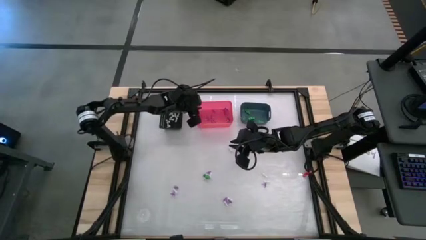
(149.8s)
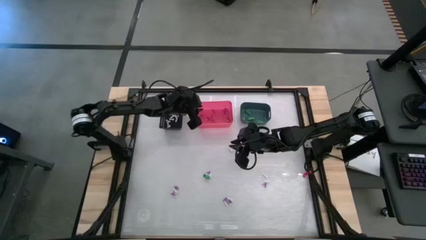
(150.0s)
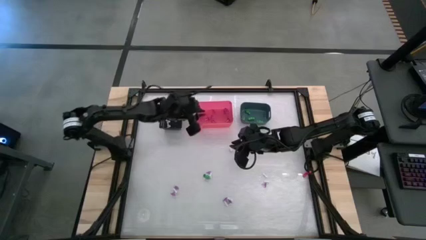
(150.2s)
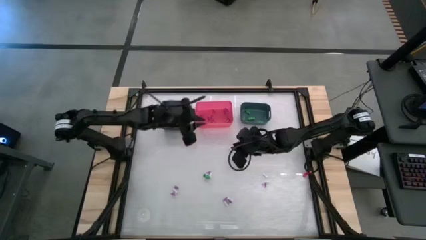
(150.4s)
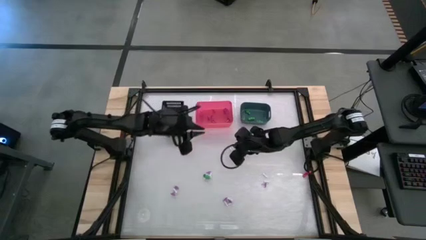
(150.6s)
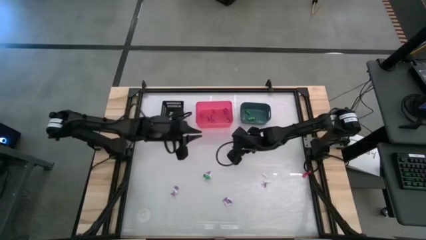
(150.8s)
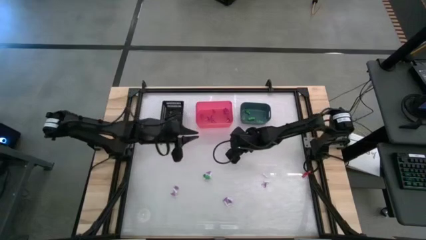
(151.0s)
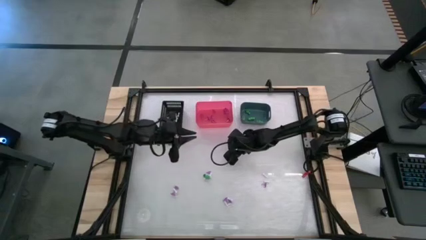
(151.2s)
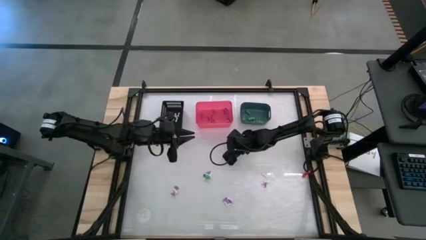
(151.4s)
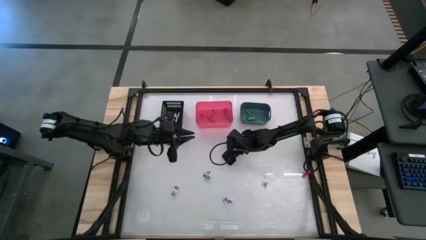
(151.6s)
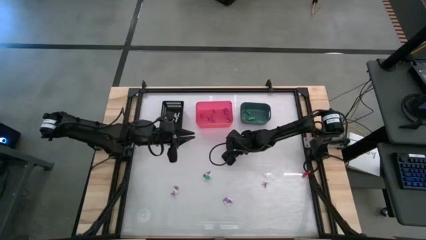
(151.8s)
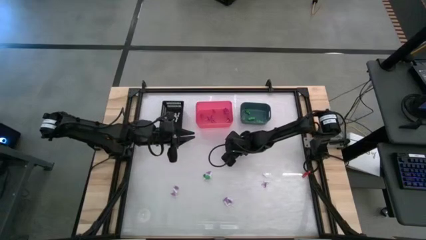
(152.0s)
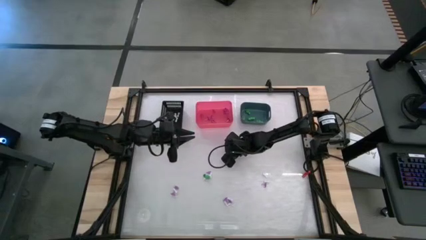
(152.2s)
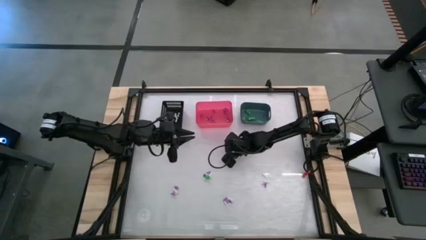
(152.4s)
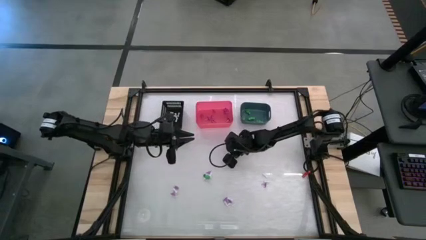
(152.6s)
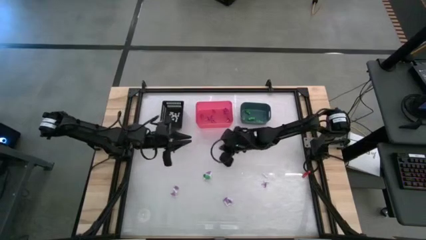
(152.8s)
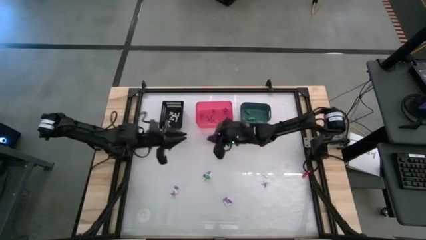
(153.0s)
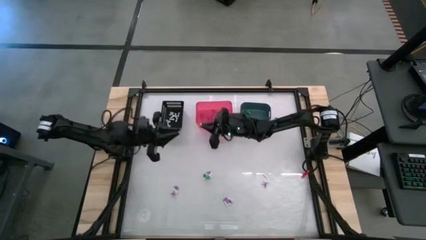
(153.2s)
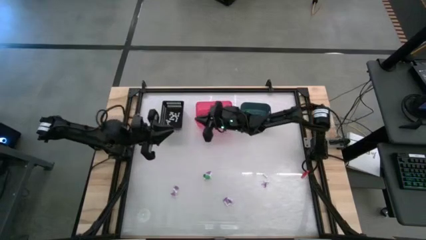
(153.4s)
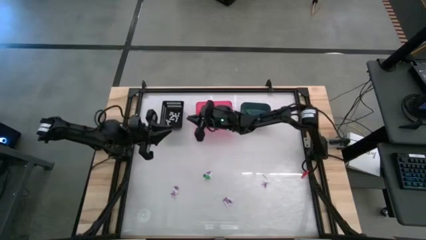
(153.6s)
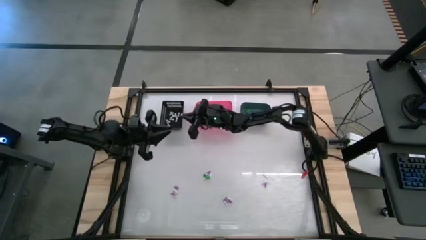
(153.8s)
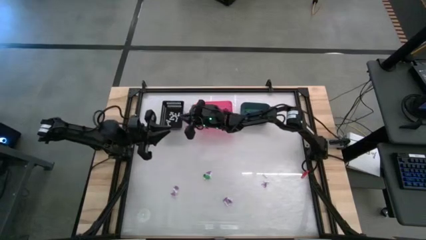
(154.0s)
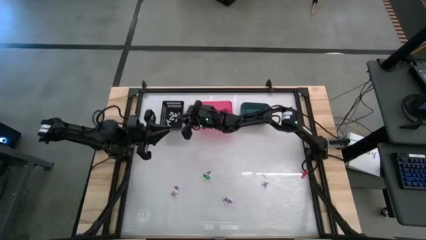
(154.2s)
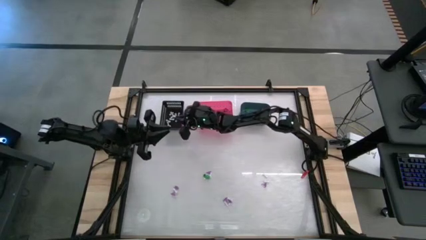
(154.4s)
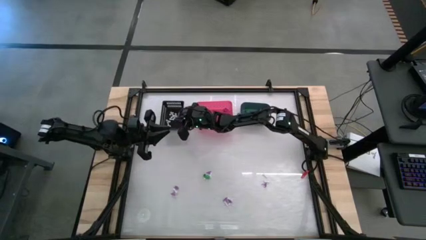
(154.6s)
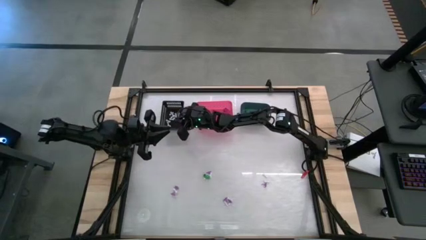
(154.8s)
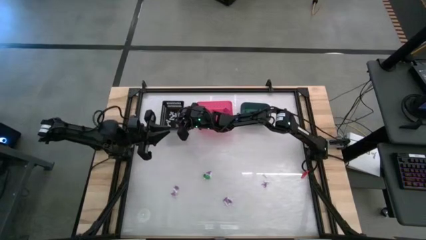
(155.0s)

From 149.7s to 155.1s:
Task: Sort Halloween decoration
Put the white bone toy into the black bin

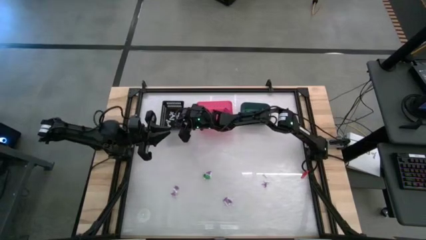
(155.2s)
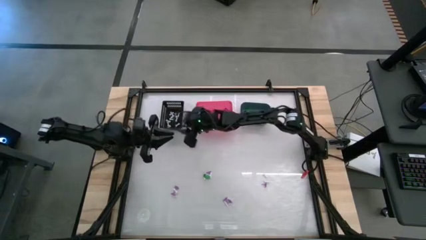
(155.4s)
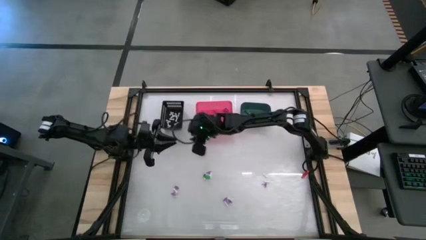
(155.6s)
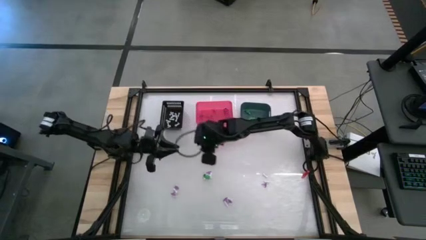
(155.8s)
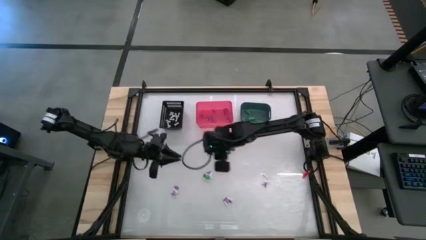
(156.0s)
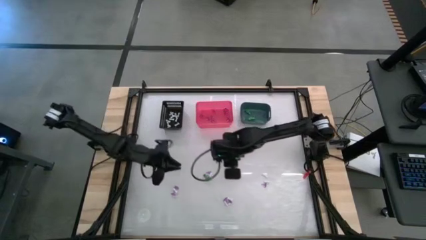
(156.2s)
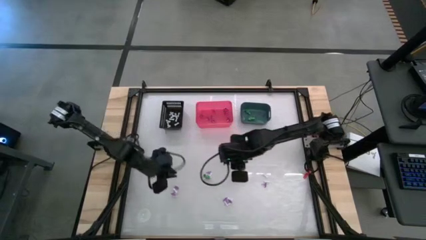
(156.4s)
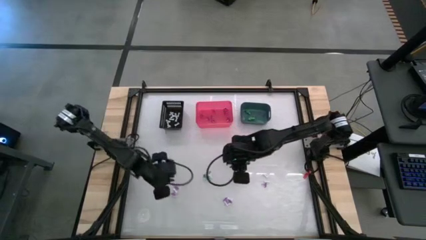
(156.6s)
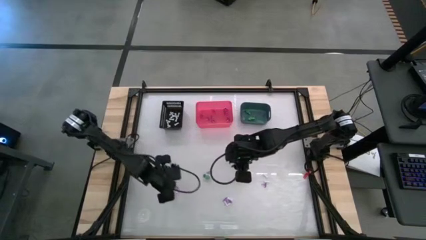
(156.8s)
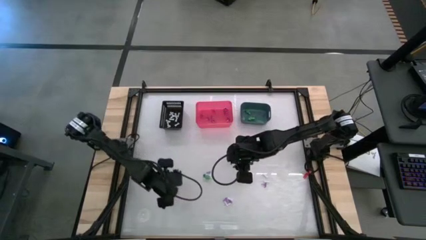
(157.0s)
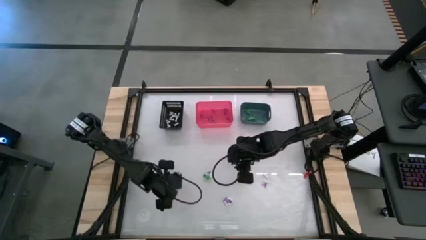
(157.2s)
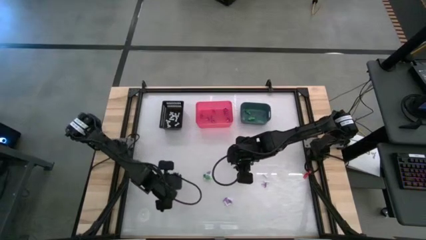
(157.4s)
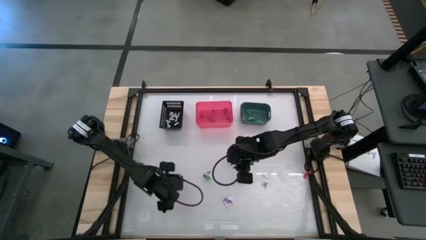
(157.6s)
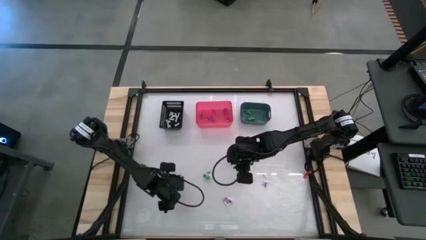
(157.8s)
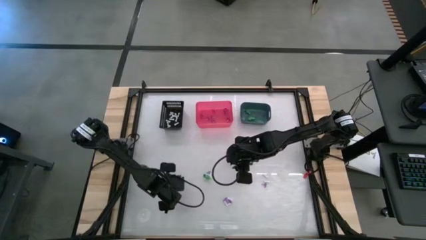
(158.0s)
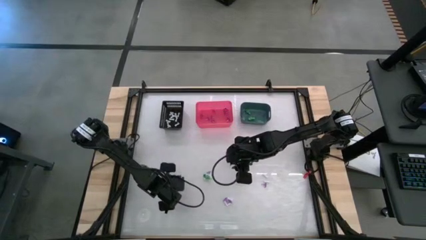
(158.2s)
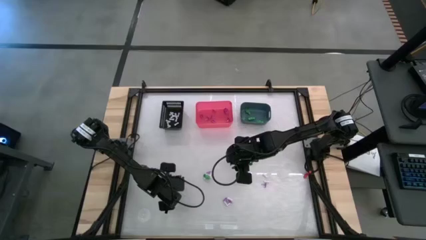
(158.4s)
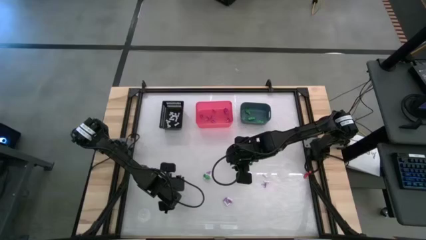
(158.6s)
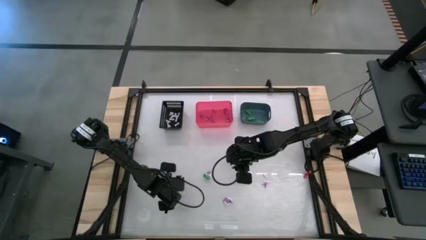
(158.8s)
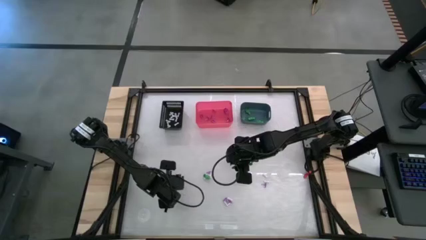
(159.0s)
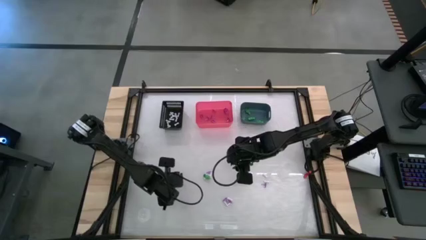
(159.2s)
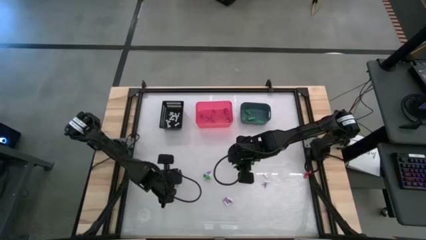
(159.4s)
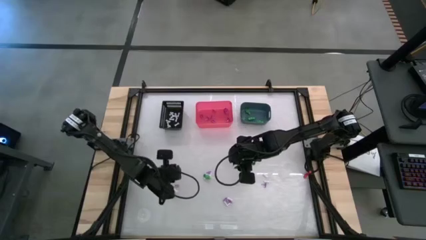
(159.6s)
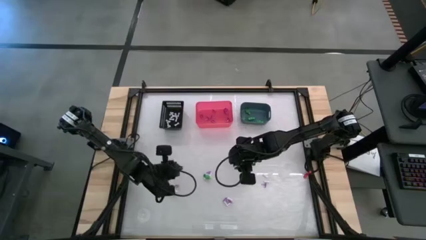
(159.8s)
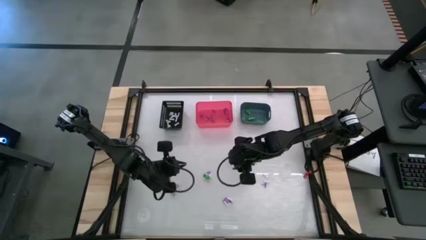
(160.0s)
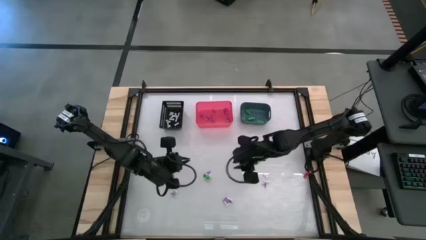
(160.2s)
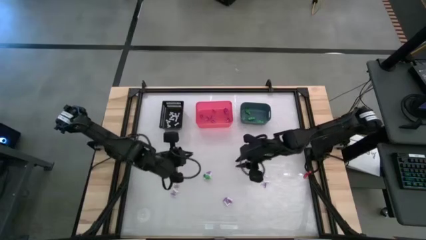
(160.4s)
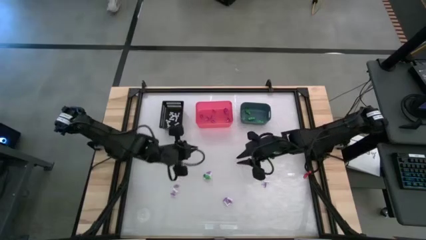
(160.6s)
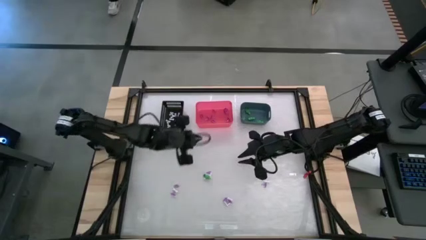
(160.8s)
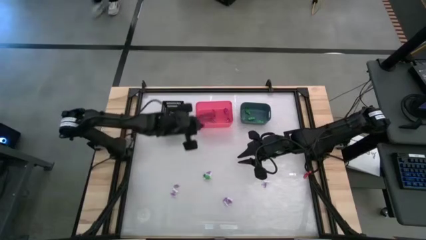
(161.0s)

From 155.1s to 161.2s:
Put the purple hat toy into the pink bin

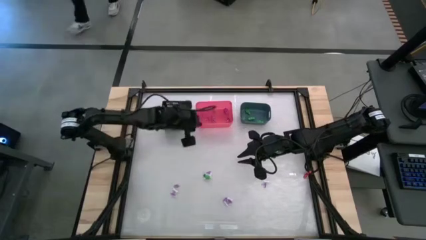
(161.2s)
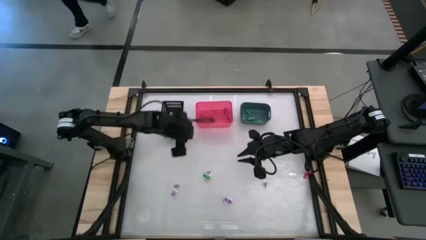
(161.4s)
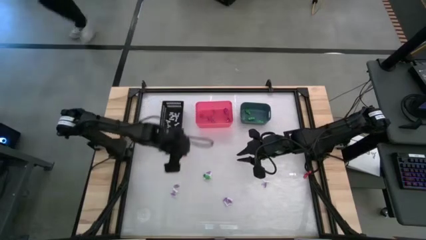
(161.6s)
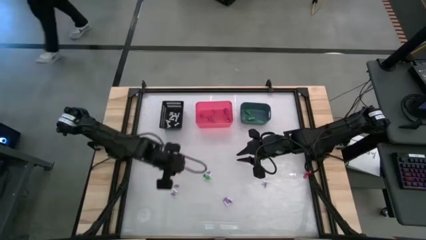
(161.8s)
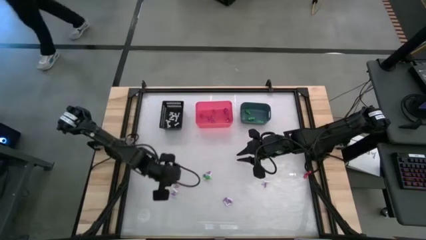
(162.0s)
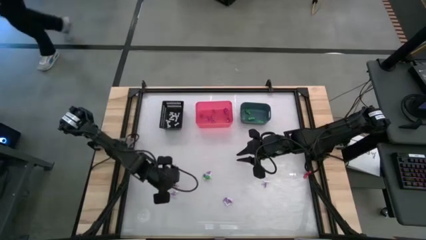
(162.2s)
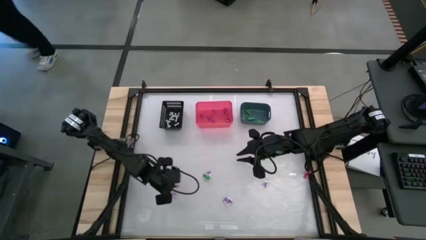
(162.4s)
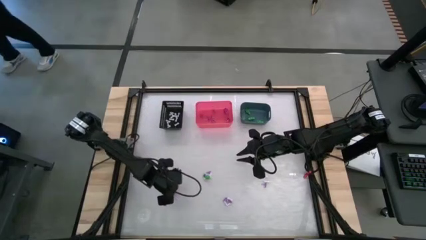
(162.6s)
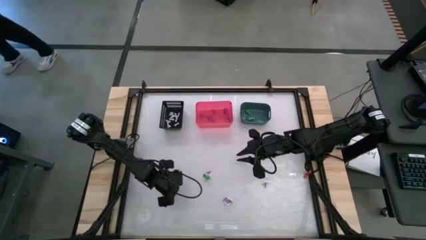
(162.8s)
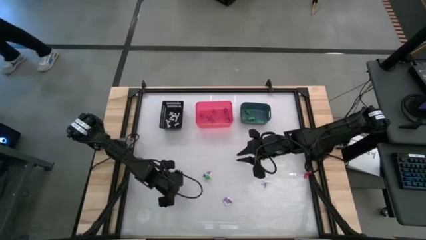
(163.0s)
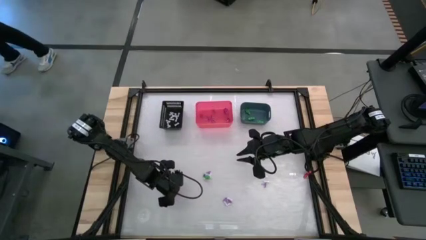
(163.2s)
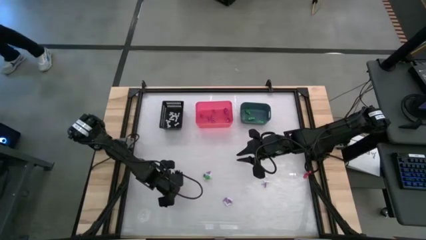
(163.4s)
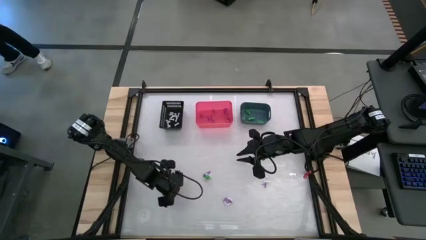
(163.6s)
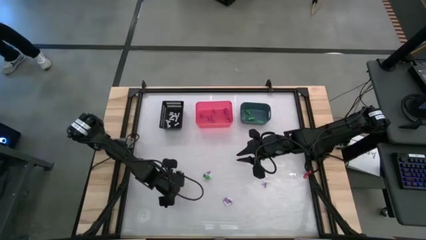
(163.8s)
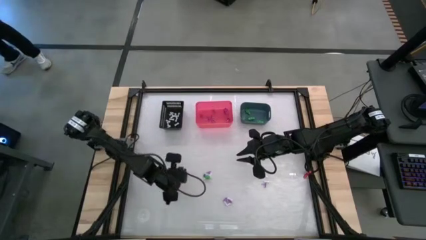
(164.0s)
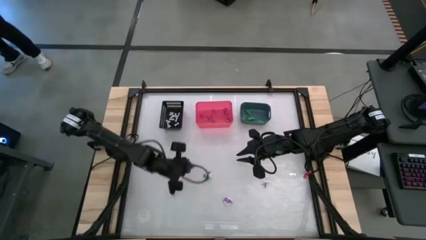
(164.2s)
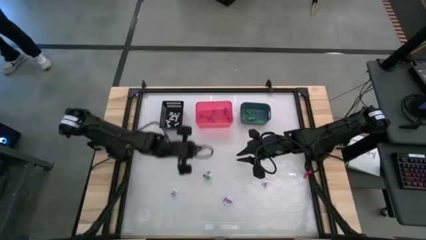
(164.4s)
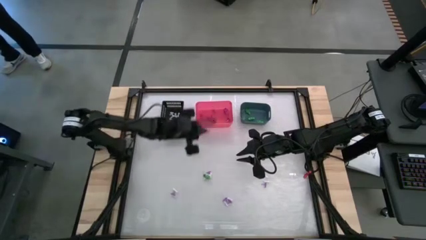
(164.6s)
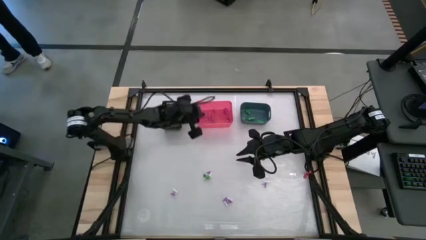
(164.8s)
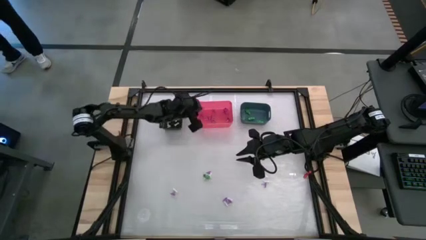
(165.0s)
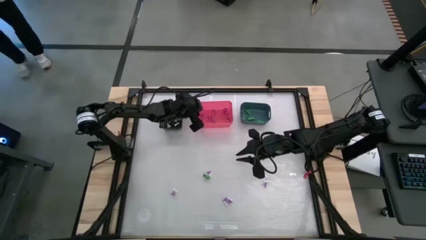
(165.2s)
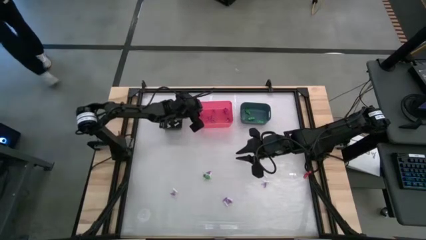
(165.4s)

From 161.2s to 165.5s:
Put the purple hat toy into the pink bin
